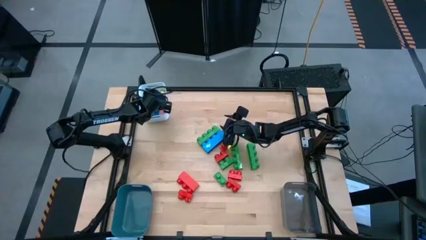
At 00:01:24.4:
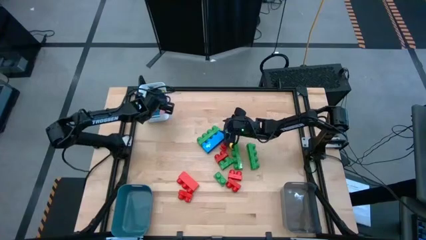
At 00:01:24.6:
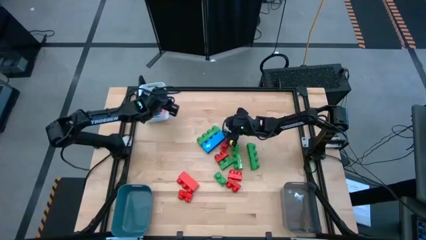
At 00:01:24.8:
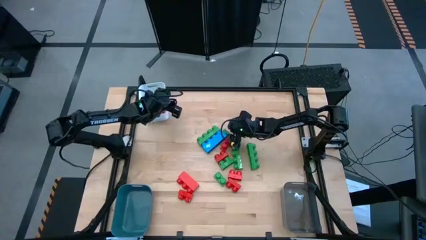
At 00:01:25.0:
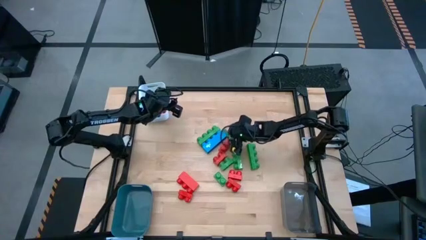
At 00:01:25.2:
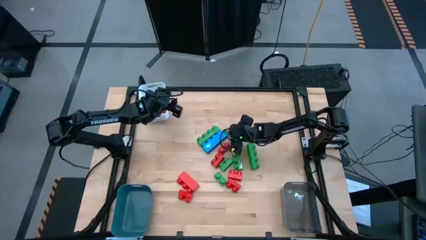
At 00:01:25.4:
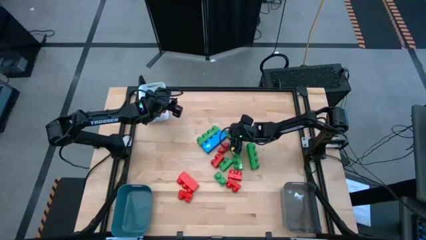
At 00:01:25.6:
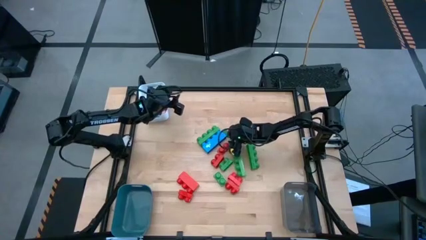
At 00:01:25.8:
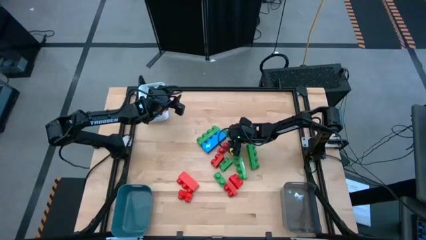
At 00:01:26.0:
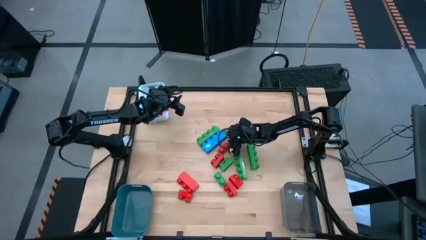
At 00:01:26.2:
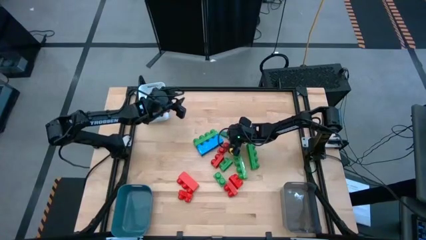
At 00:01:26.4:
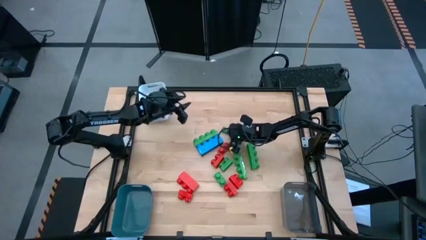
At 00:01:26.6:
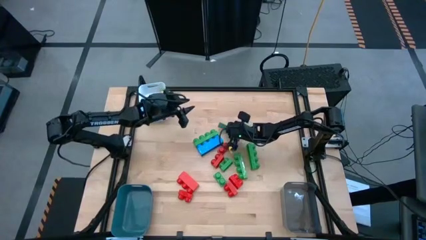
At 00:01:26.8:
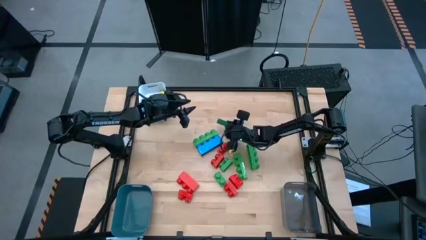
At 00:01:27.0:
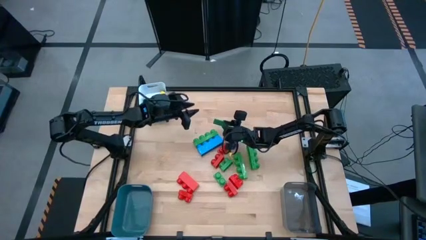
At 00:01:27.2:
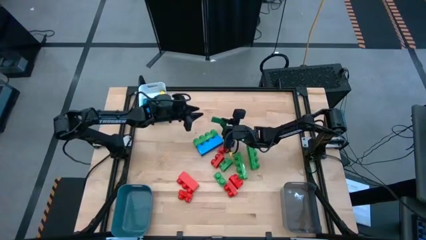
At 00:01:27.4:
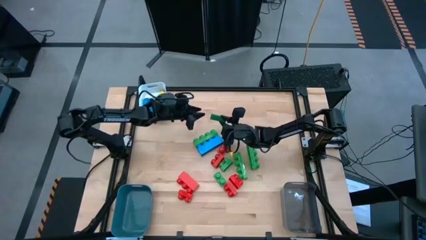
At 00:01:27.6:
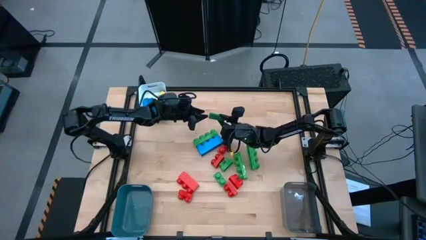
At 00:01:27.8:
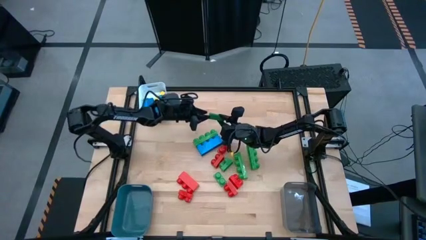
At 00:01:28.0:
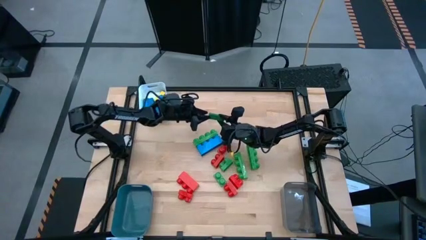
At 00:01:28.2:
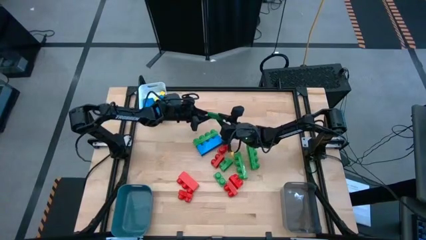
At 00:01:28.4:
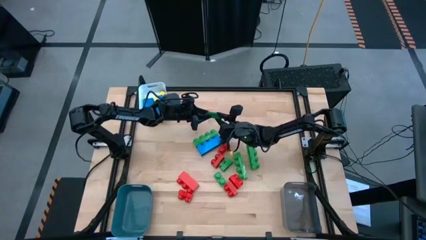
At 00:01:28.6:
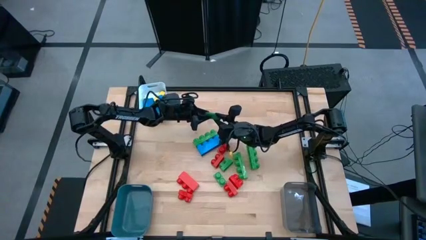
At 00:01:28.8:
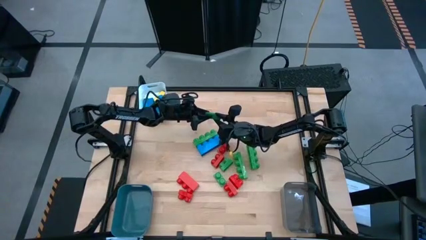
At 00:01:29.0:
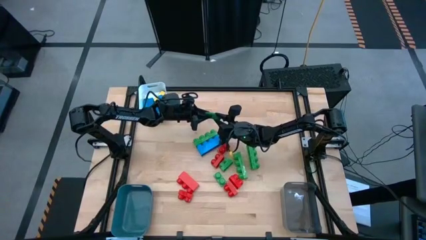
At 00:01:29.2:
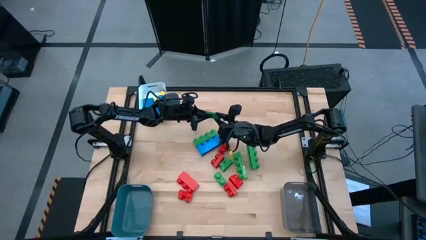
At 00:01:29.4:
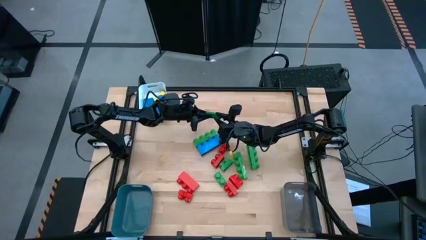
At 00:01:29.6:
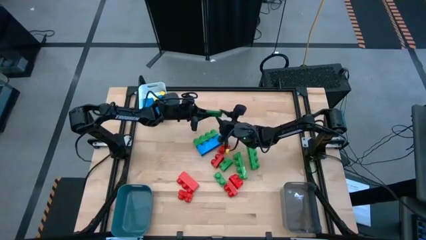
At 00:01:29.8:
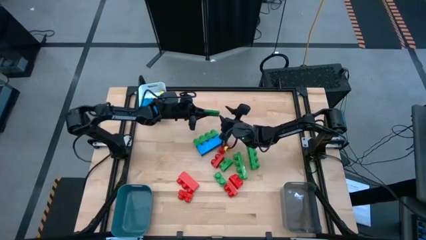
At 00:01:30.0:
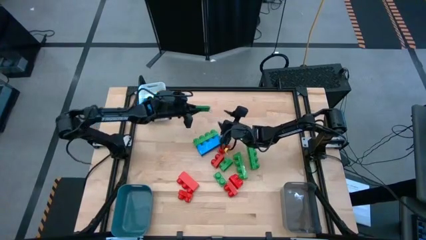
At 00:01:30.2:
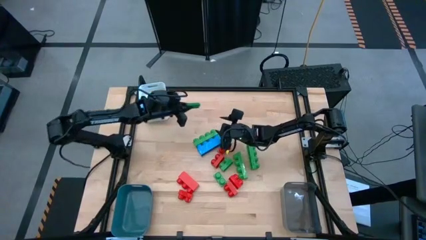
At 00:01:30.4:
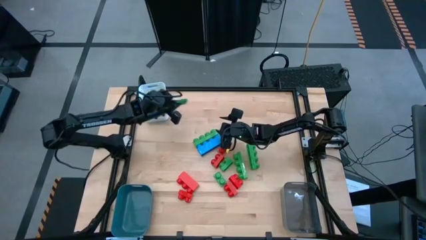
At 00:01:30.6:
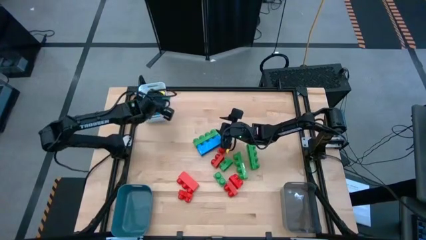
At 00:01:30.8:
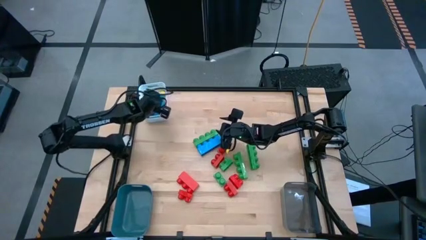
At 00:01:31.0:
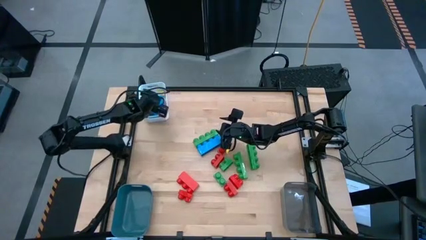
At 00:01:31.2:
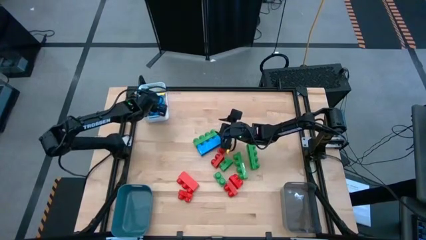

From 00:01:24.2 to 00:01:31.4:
Task: Sort blocks by size
Put the green block into the white bin

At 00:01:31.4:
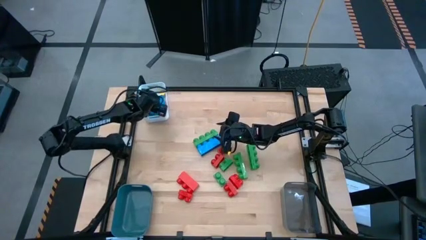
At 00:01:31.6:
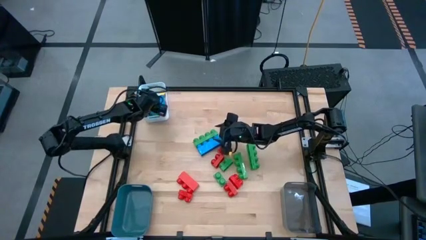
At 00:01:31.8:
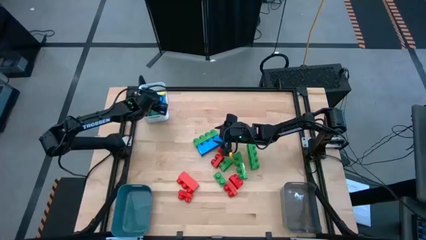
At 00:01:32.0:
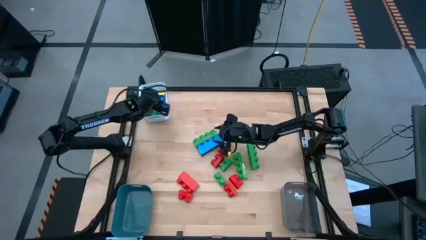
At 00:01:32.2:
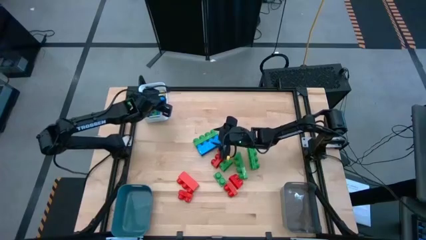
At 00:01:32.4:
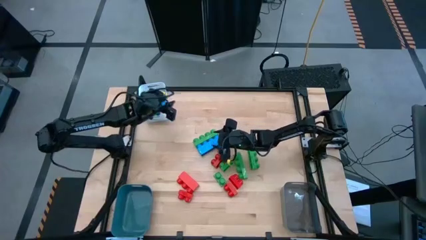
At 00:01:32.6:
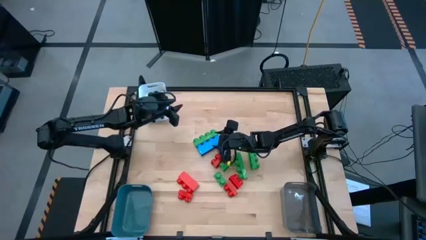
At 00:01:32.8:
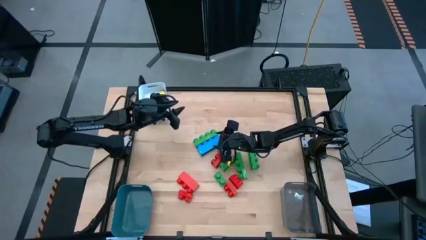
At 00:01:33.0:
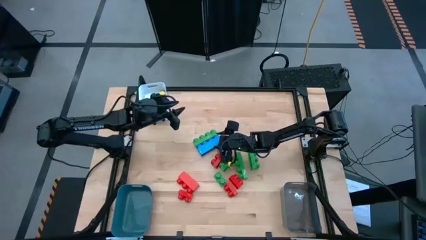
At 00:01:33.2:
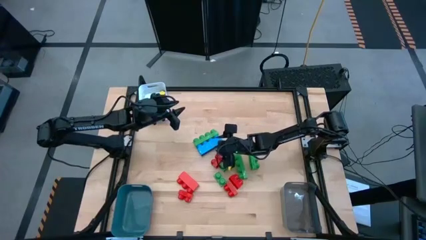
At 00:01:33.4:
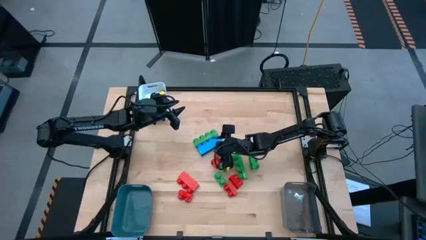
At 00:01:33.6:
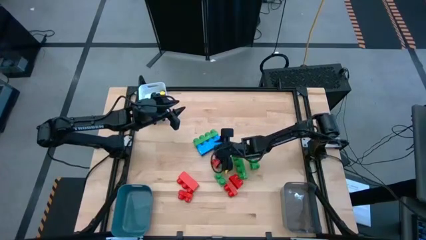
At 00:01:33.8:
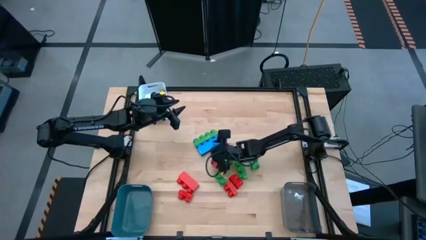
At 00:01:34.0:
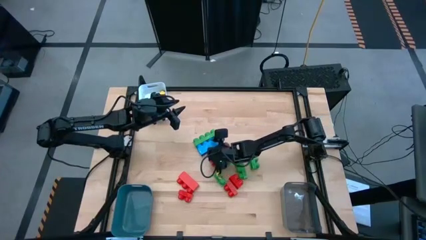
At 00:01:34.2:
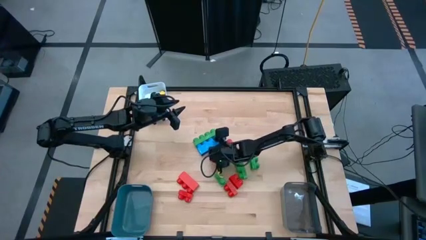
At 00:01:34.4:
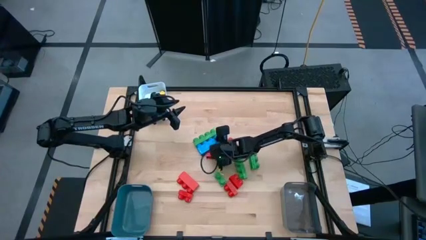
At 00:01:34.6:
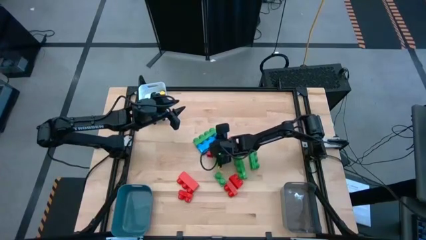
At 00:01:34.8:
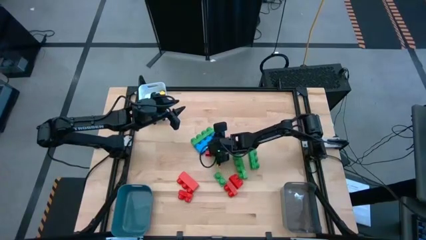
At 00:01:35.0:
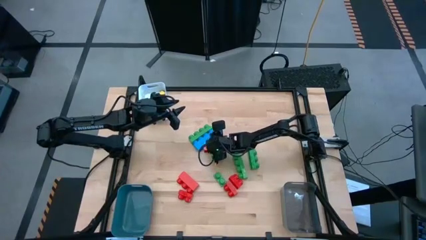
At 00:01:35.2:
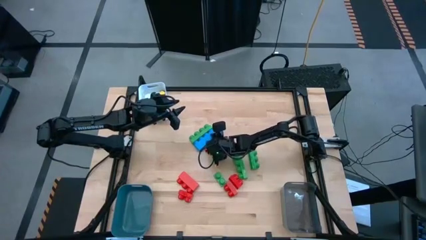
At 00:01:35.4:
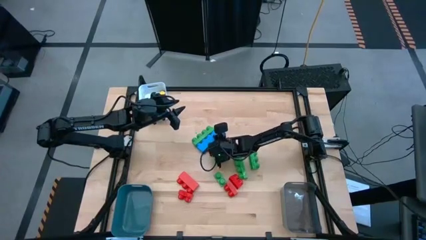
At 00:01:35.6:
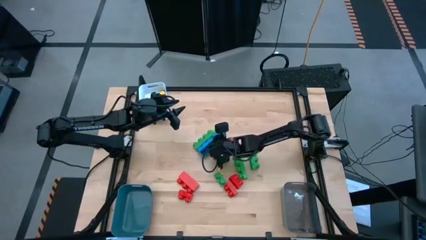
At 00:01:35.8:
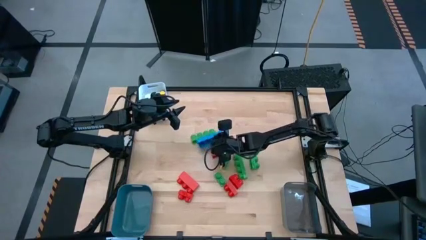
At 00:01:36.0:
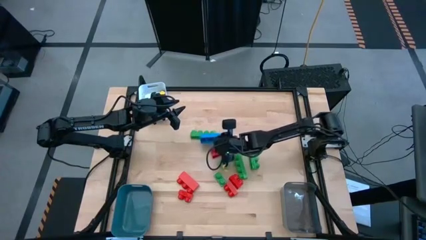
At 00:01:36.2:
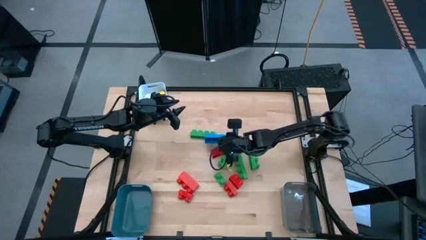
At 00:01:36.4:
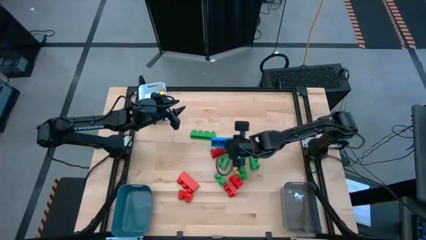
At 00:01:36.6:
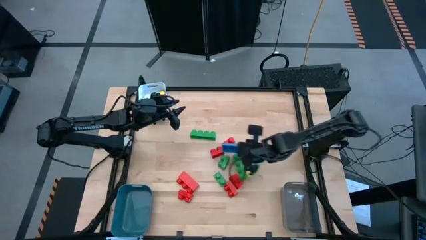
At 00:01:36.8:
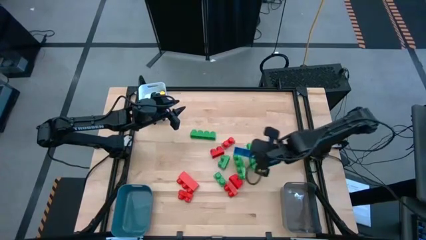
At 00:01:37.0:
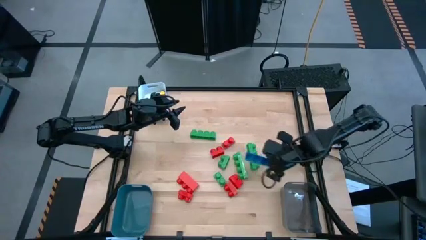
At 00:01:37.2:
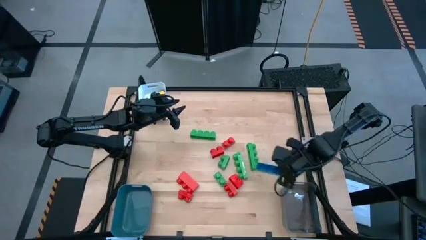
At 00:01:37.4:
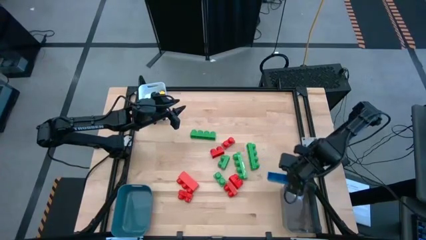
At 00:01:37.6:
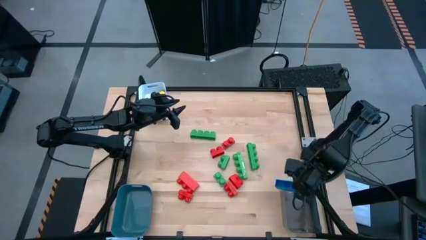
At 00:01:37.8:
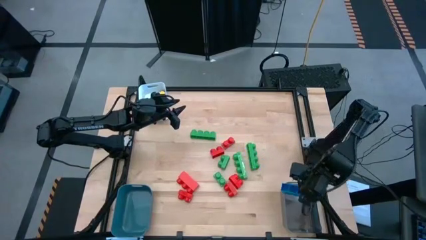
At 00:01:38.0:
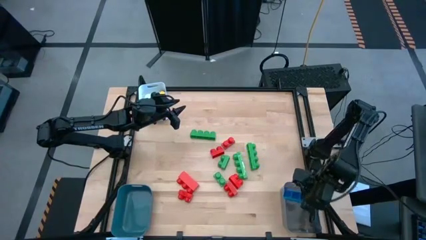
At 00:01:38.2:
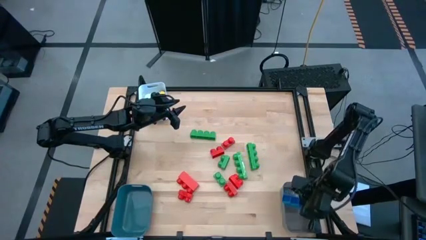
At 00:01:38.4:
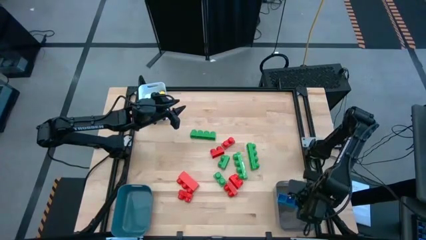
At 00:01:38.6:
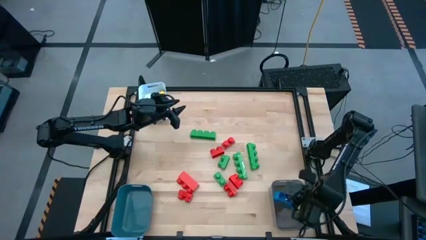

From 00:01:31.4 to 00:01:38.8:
Put the blue 4 stud gamepiece into the black bin

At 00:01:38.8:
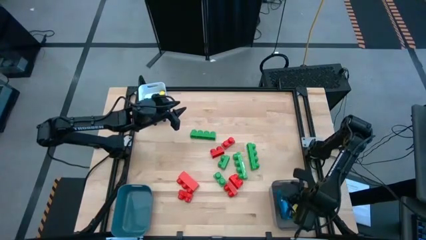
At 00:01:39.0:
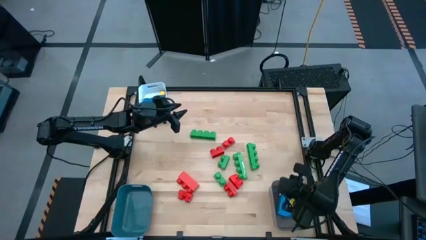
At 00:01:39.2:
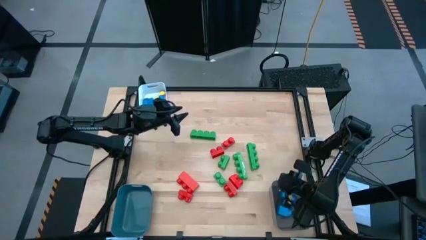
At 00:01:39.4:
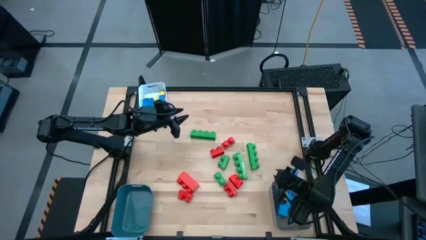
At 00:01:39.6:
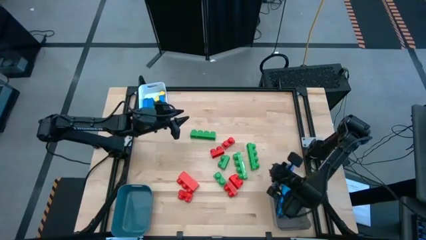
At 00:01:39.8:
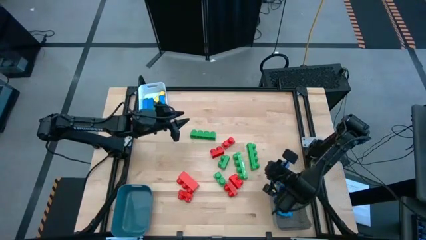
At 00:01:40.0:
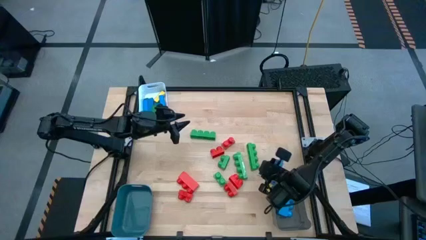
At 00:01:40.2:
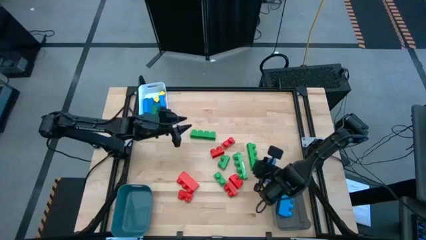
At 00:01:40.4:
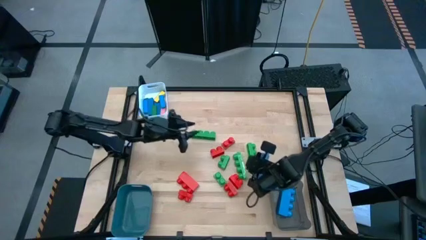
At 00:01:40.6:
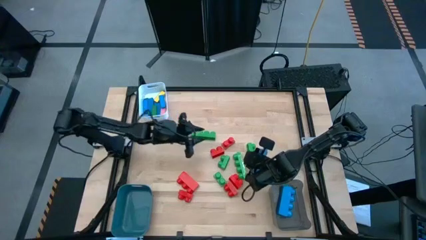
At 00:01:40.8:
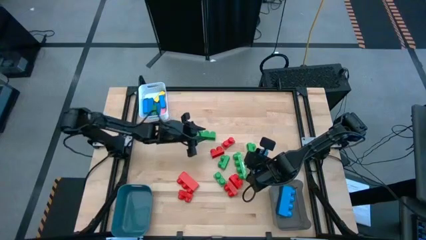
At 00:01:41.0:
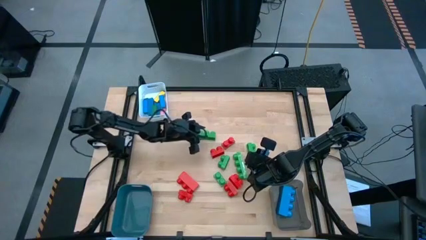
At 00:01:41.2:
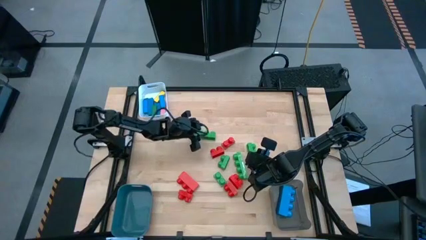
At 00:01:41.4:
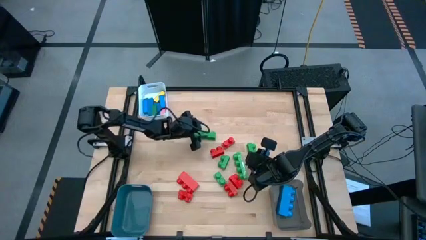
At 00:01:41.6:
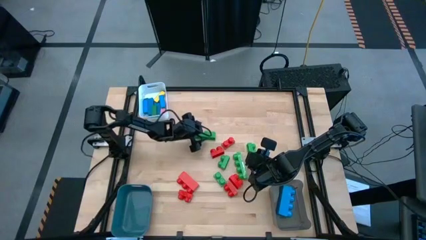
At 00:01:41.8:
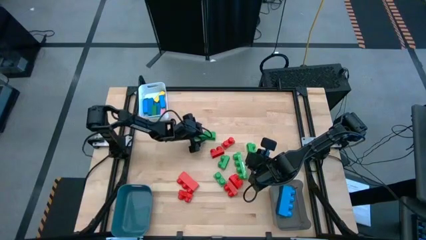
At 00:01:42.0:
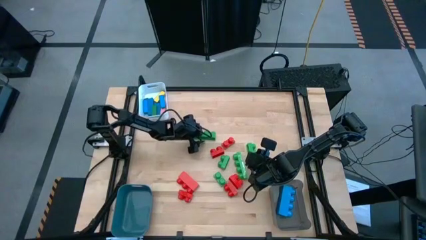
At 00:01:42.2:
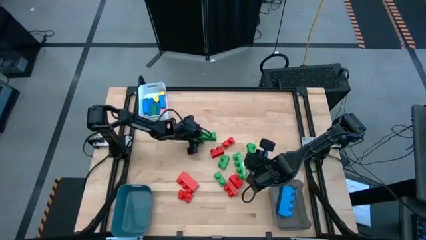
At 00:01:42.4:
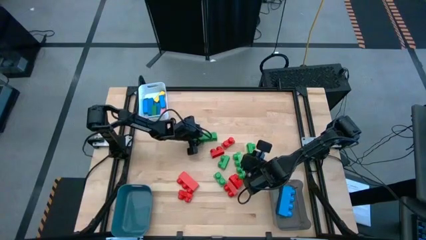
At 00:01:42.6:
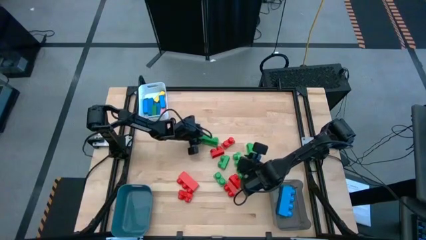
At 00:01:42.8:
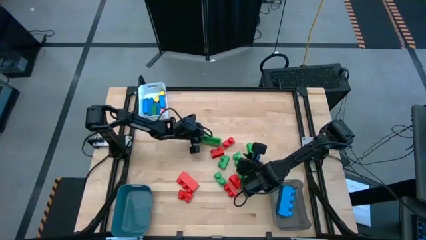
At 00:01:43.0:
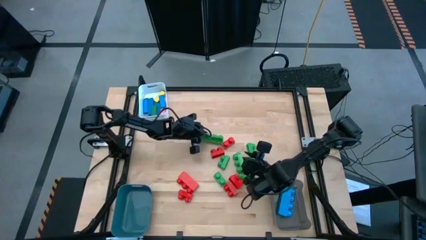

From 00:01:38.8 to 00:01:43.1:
Put the green 4 stud gamepiece into the black bin
